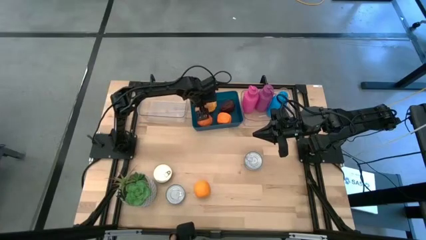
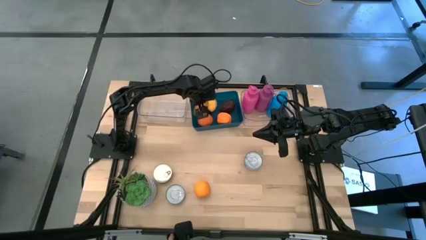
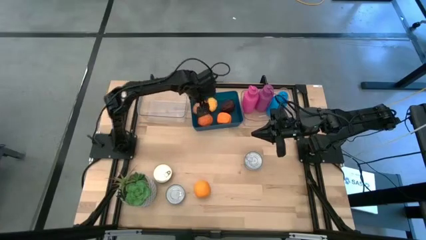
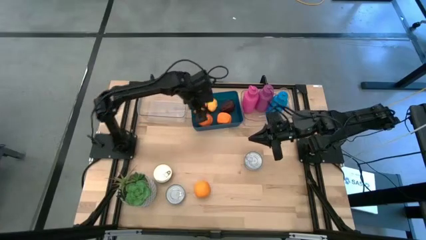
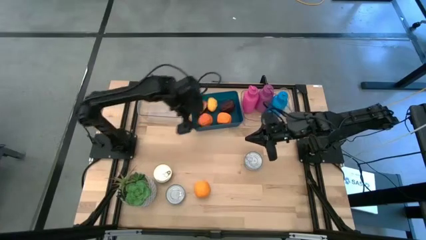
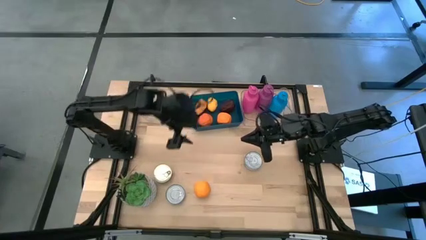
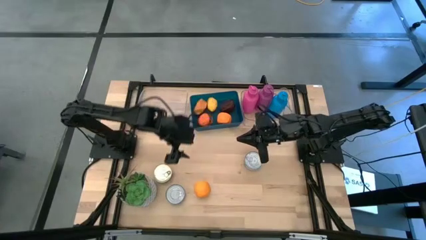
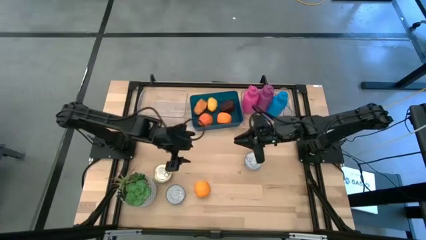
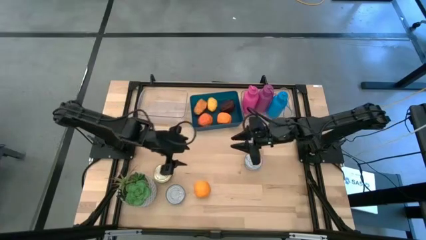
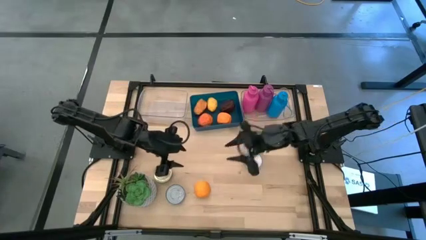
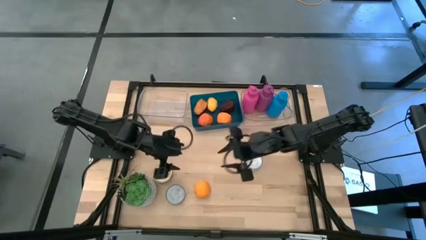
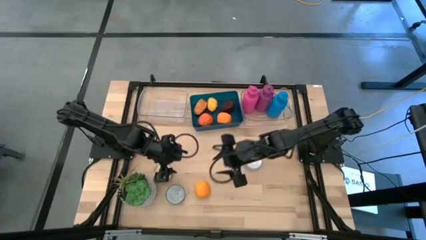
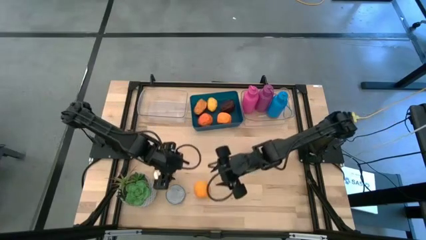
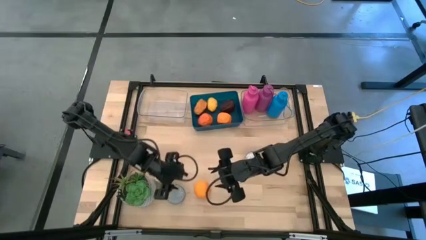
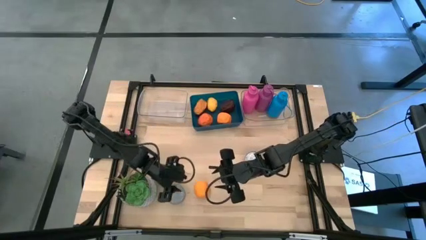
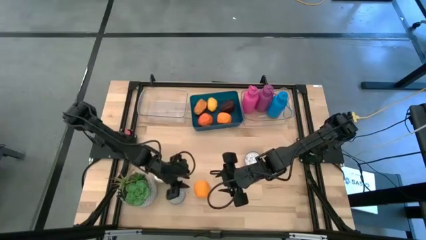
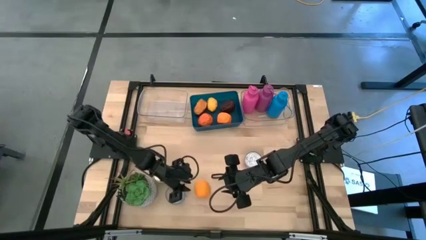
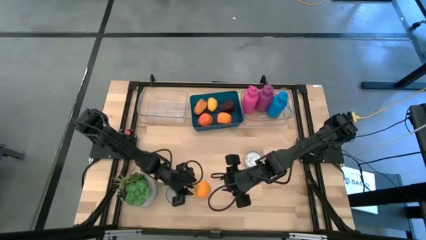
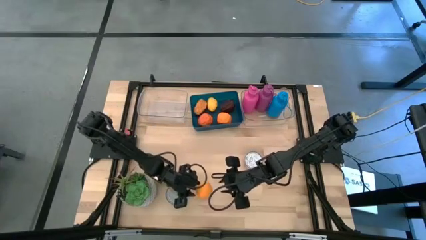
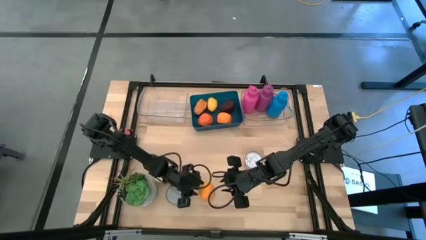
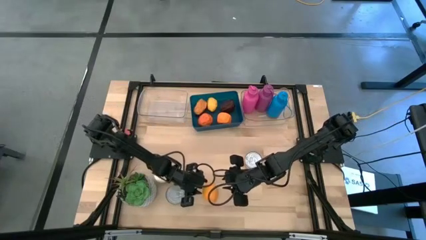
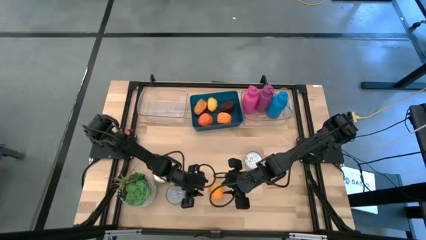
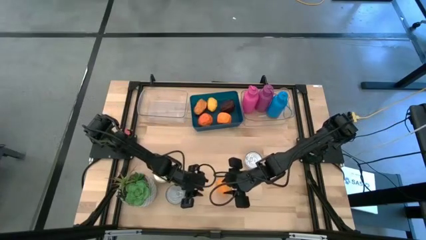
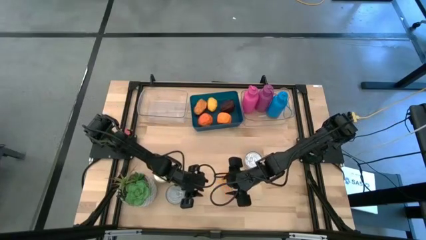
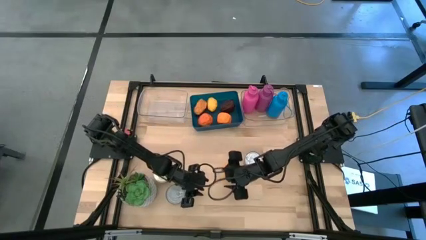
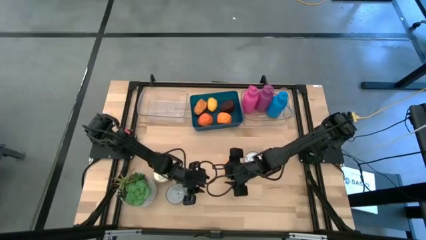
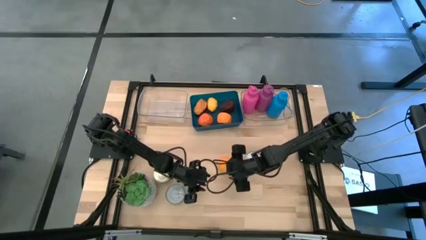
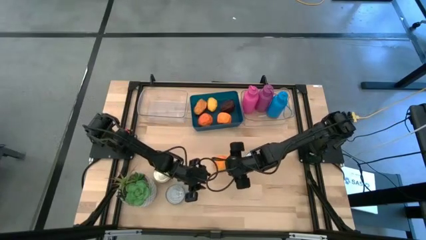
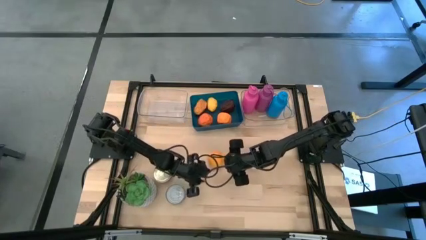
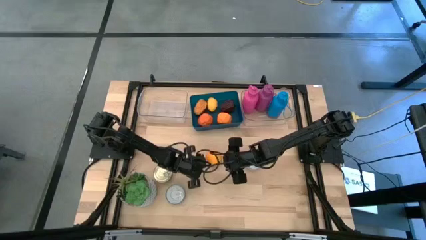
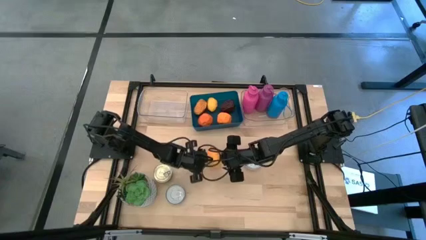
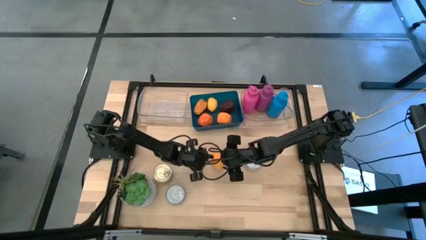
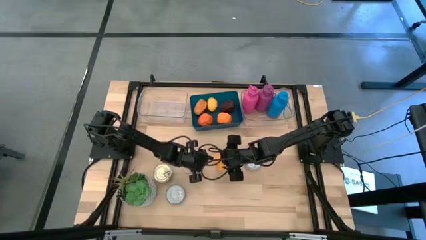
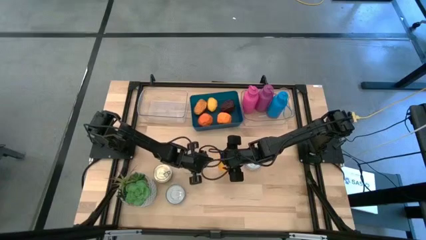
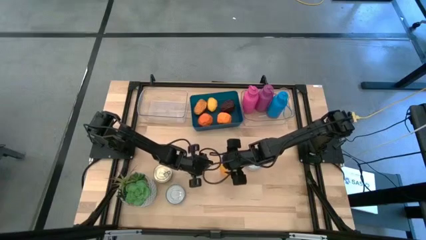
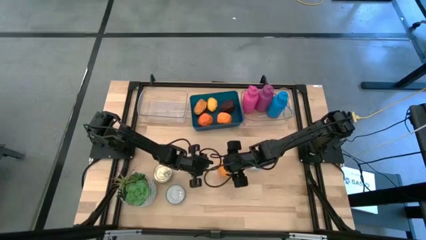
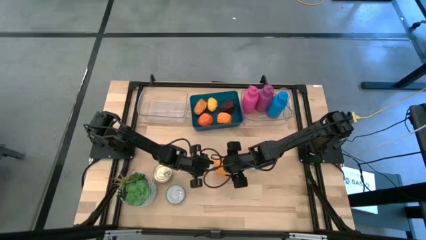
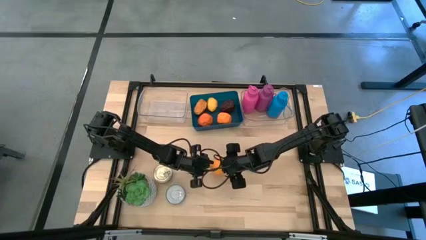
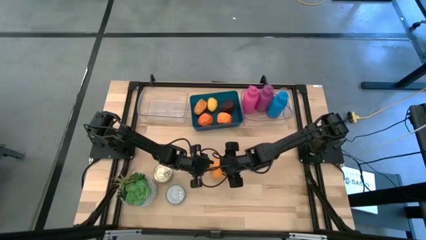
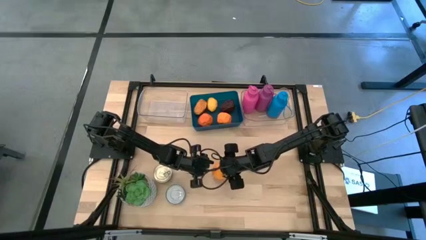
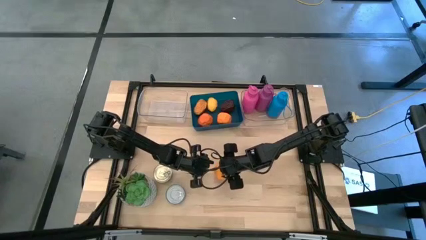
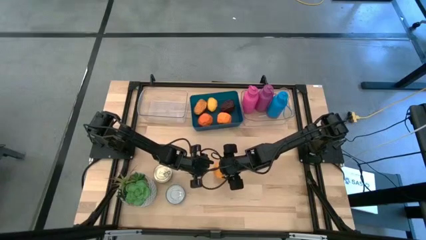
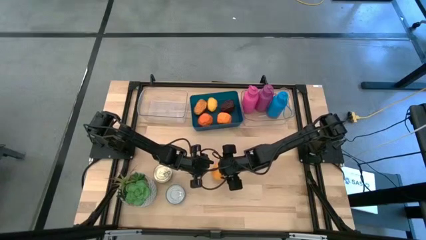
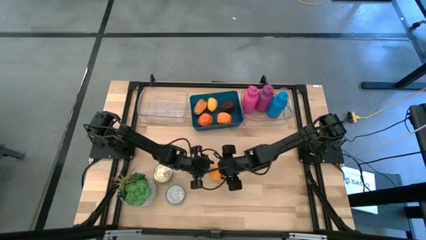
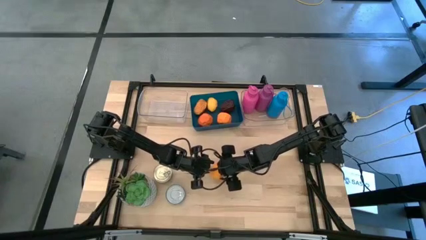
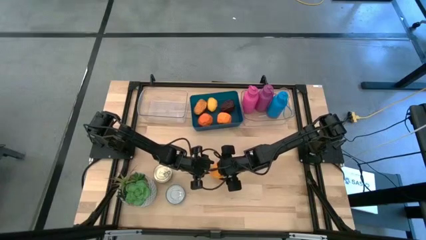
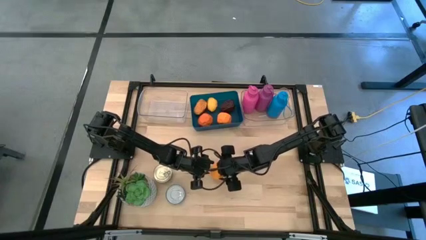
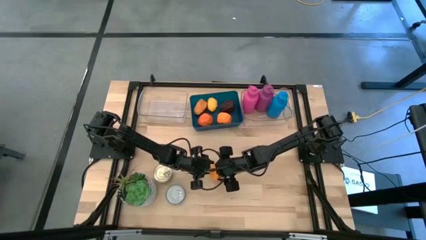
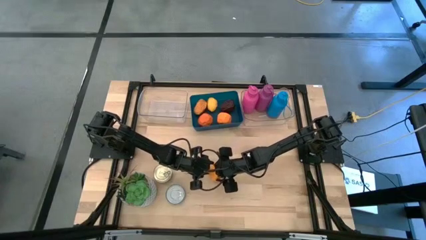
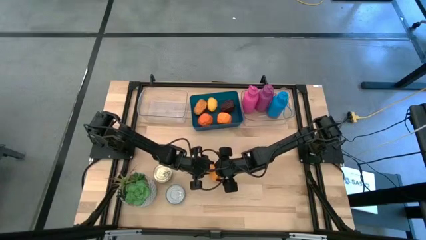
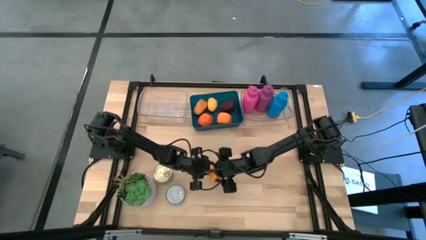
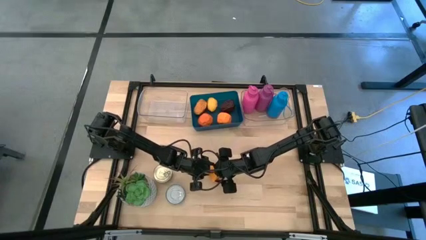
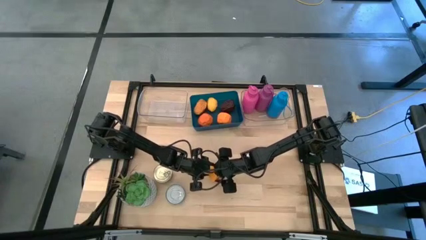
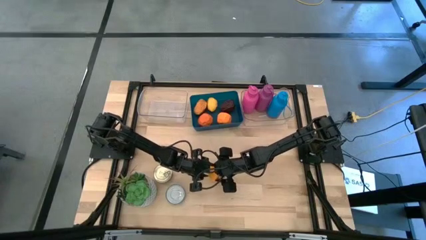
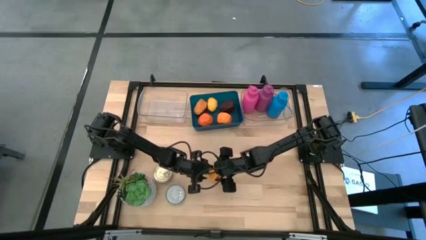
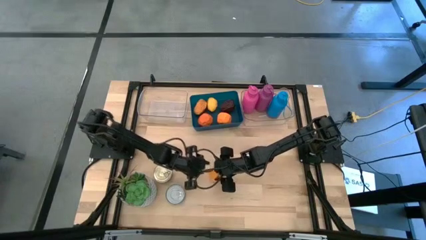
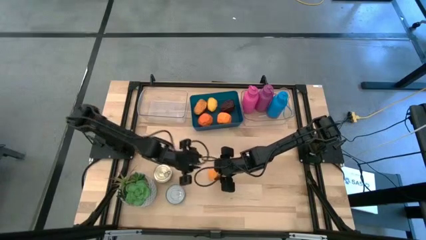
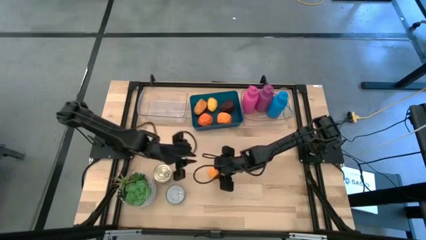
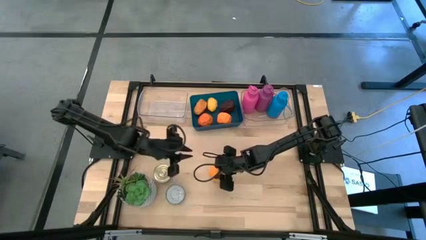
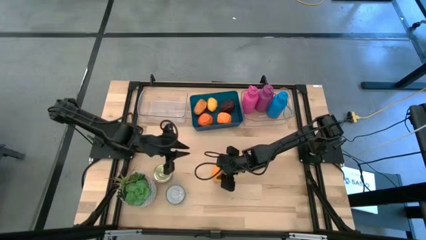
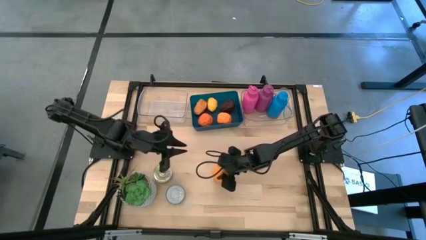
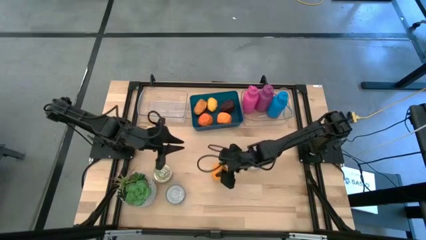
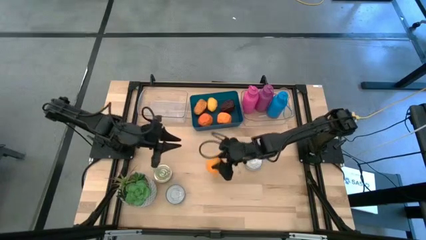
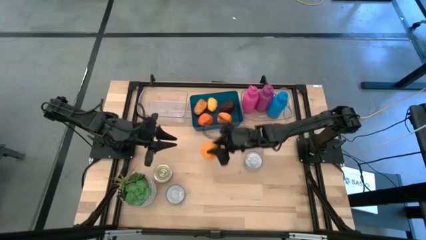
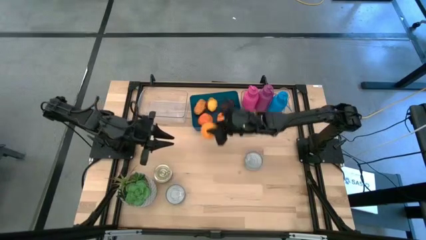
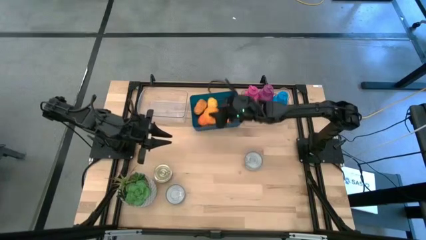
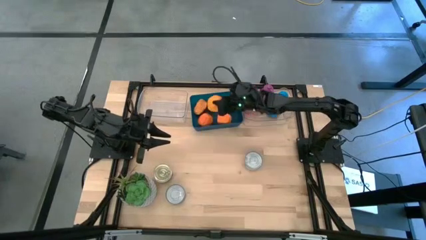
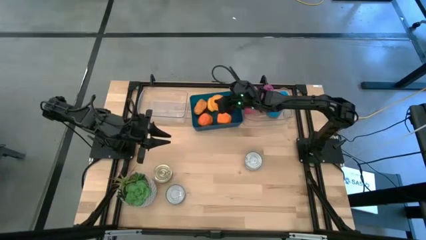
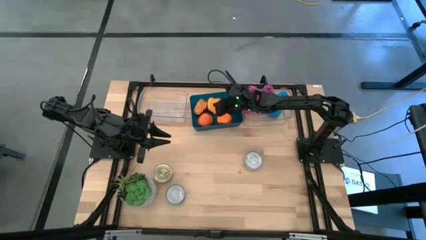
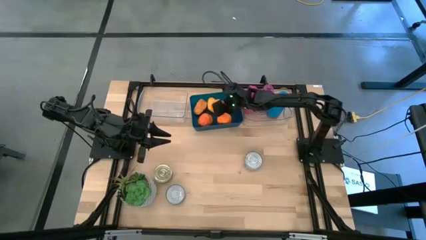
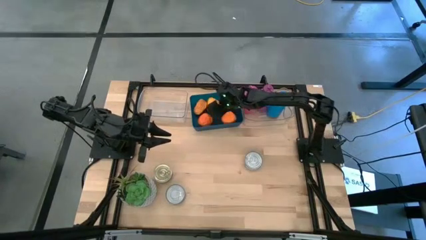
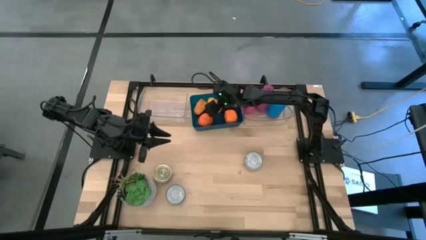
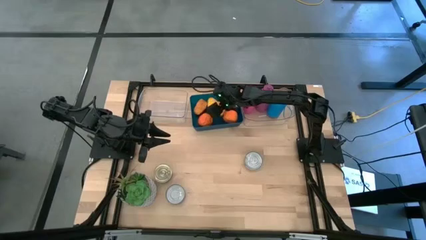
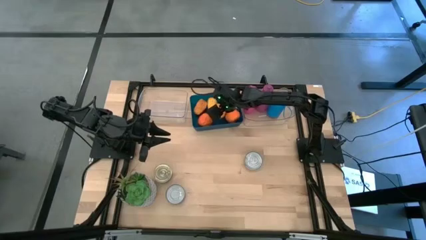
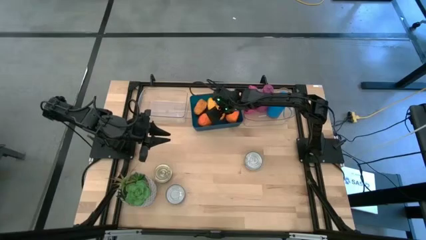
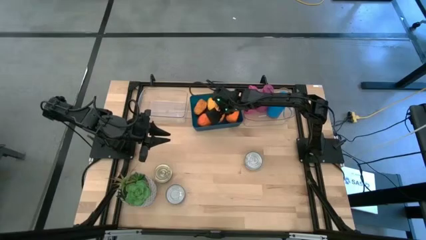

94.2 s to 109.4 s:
Task: Pick & Place Food Item
Put the orange into the blue bin
